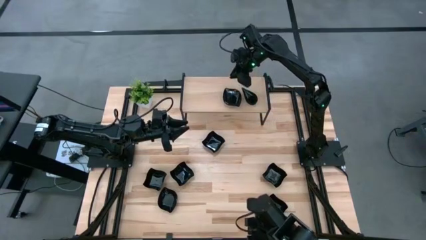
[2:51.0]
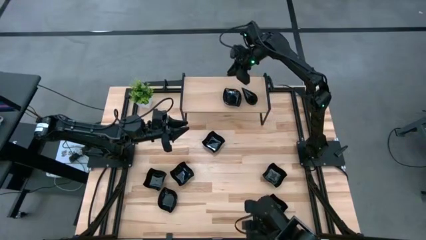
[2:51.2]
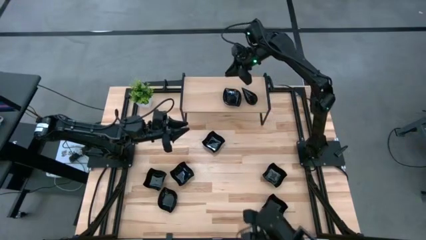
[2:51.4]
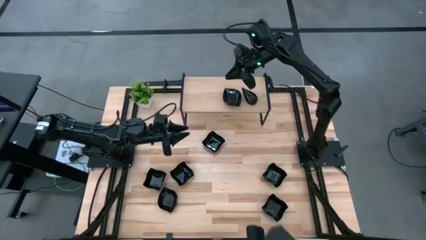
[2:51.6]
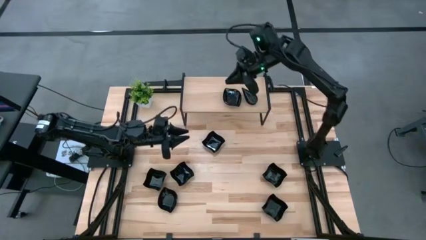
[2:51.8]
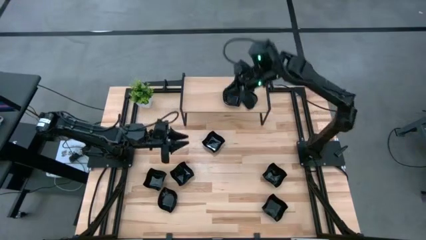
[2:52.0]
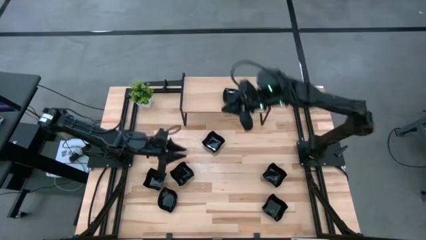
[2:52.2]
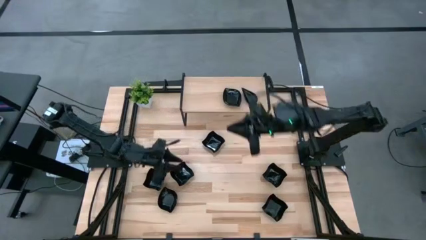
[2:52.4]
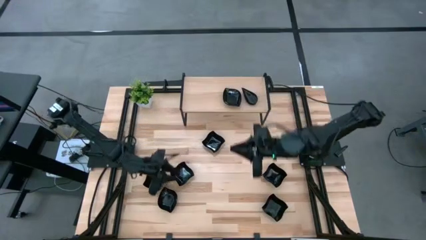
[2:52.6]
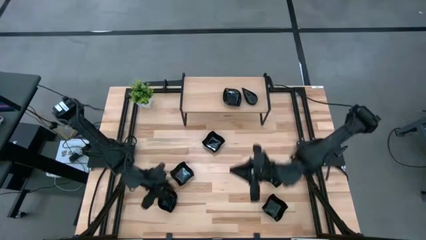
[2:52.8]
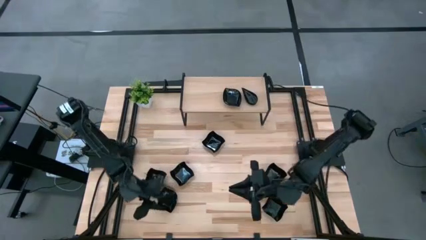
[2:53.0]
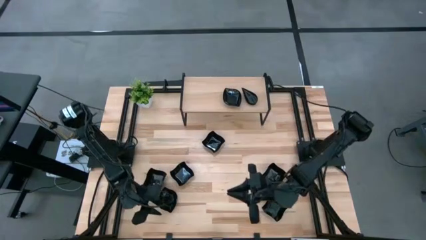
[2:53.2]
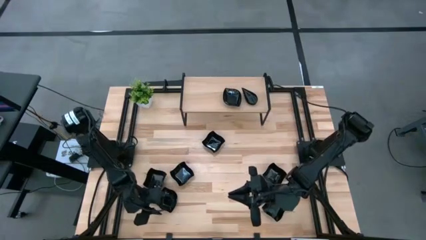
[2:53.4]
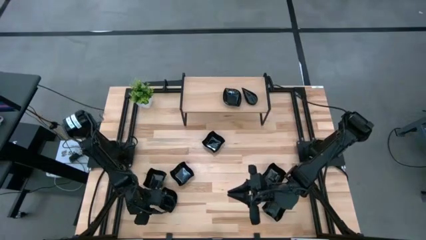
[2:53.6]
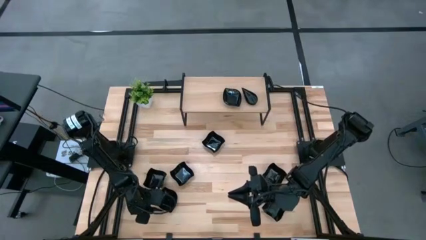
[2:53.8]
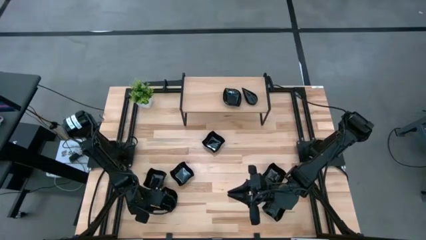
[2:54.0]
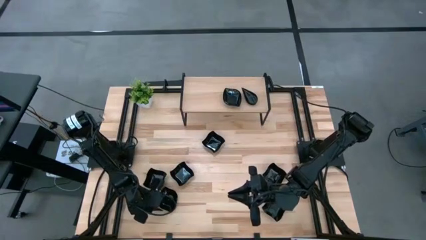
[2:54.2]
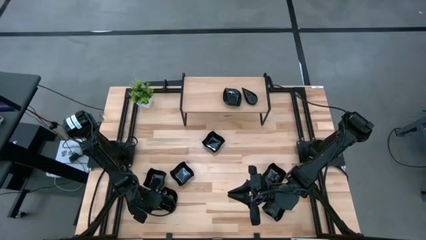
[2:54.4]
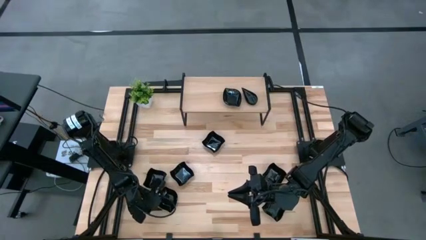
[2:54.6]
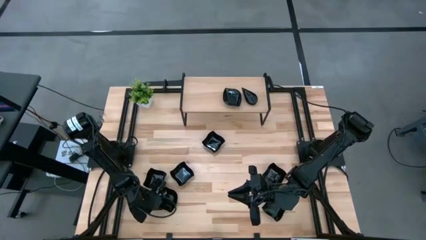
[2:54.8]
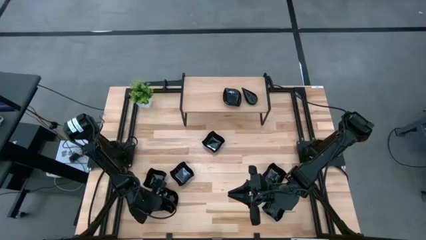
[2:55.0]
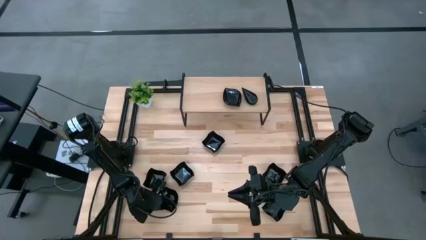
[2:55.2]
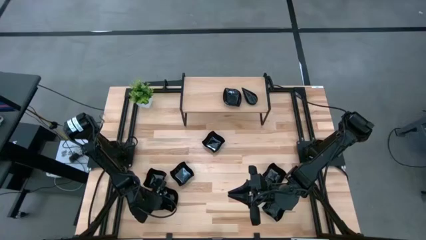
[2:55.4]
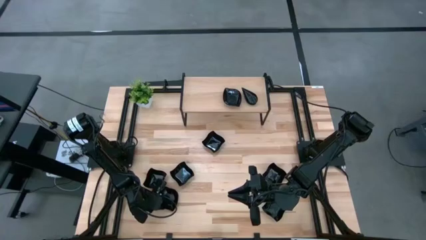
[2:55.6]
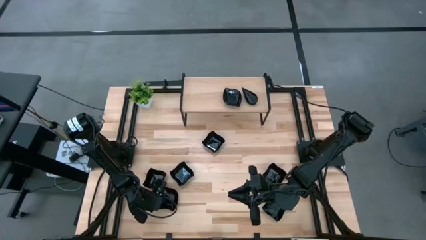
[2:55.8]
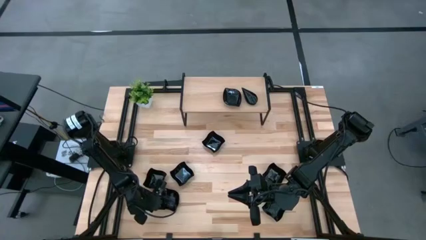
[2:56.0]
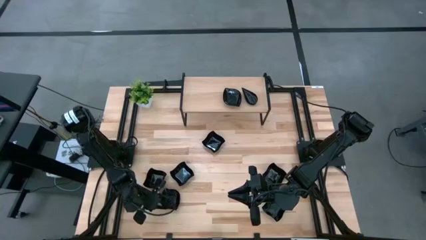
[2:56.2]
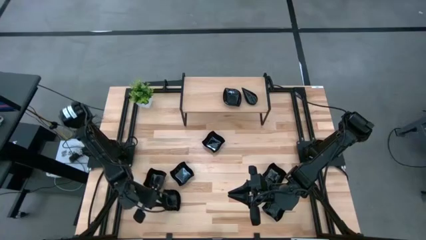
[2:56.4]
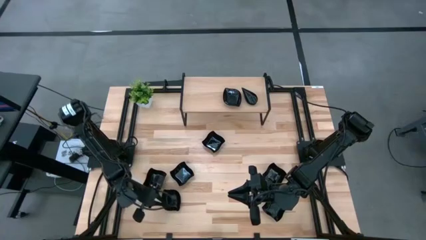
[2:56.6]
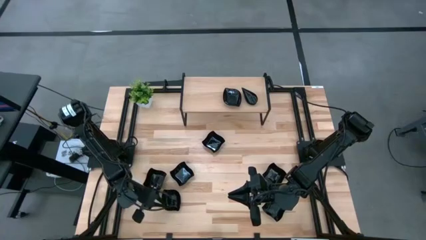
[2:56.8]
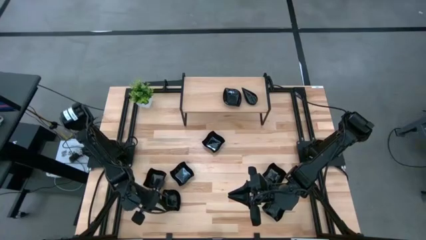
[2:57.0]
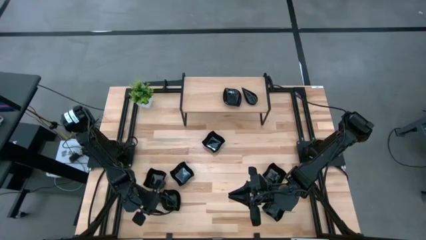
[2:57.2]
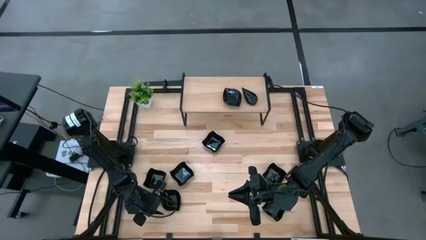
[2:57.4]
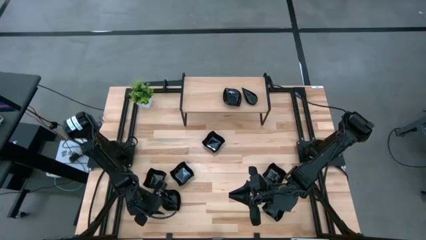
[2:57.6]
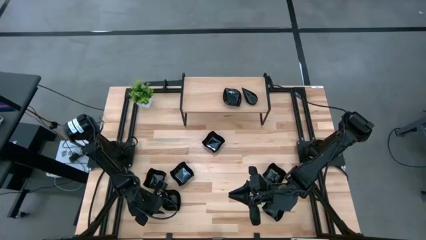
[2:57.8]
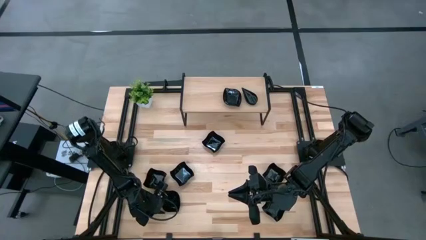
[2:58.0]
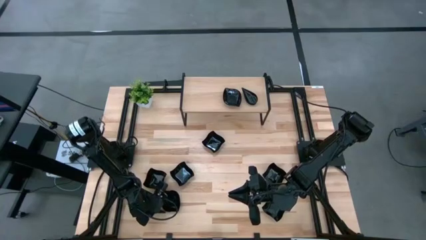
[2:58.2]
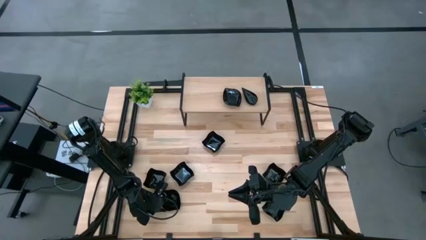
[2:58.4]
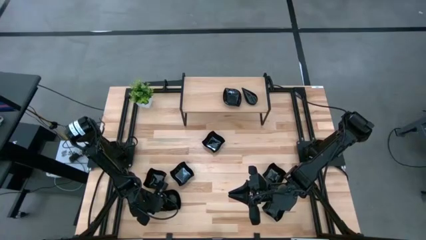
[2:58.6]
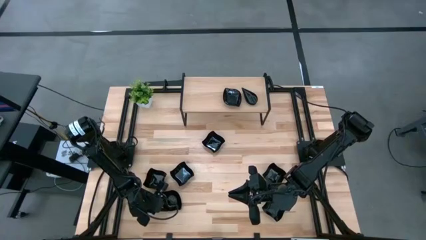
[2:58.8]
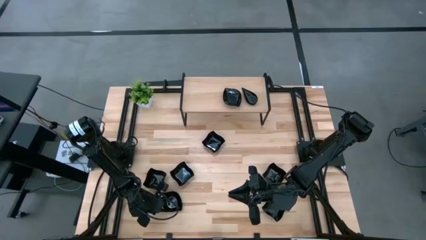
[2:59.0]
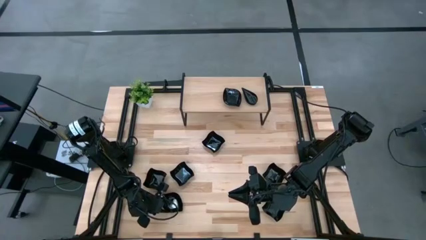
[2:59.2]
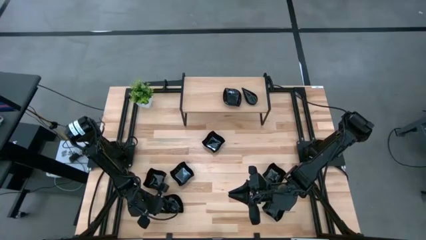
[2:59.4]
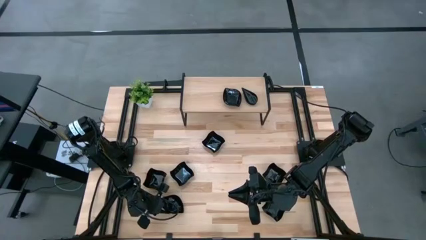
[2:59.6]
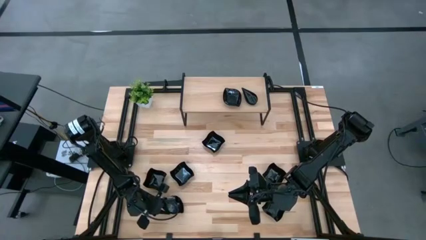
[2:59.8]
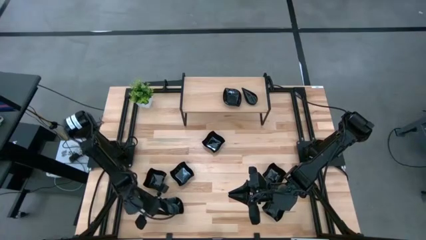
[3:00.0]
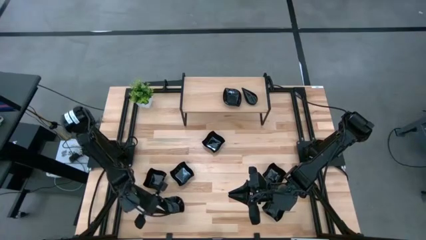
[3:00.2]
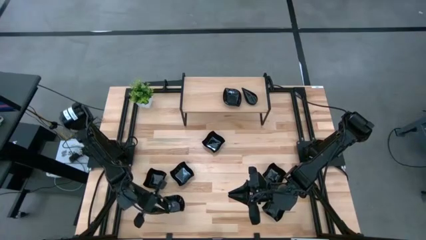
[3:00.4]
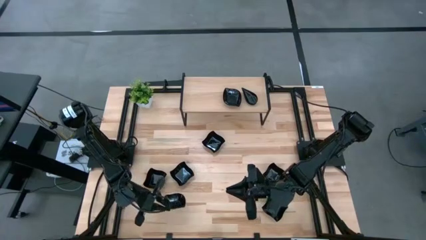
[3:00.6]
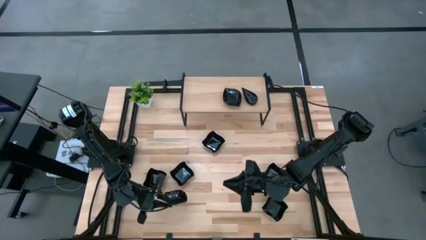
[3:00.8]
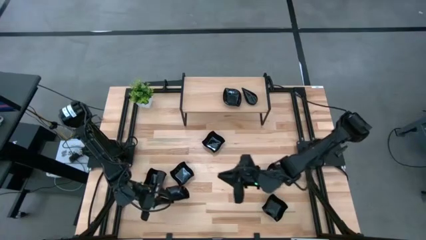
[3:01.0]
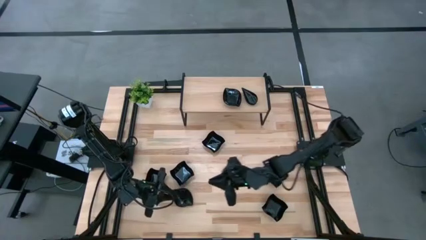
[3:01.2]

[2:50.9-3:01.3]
Task: Pick & Place Mini shaped plates
Stack the black leaf shaped plate on top of the black leaf shaped plate on the shelf

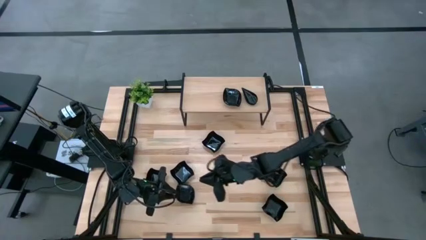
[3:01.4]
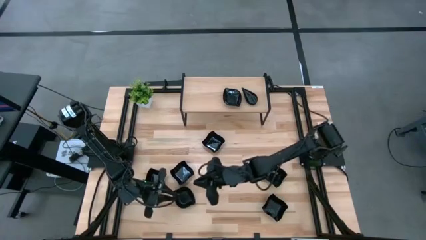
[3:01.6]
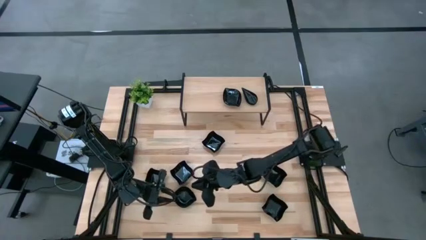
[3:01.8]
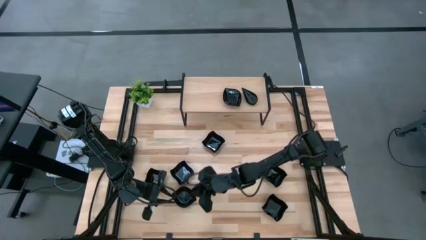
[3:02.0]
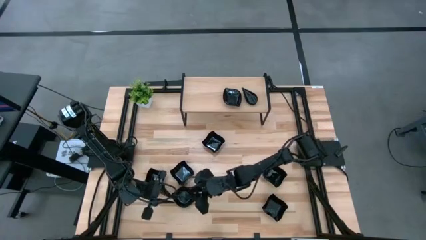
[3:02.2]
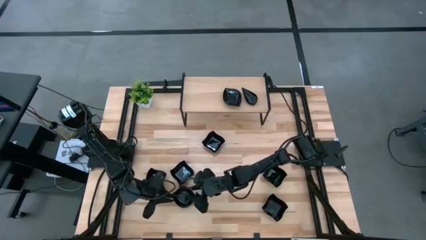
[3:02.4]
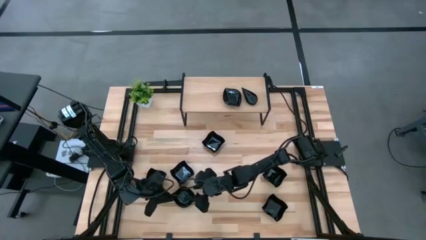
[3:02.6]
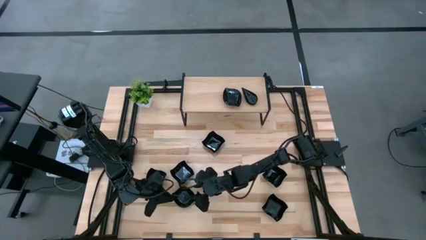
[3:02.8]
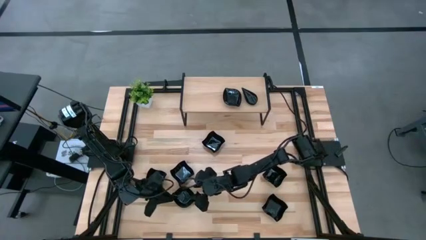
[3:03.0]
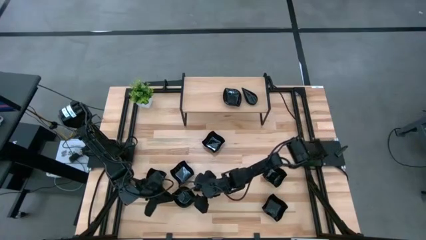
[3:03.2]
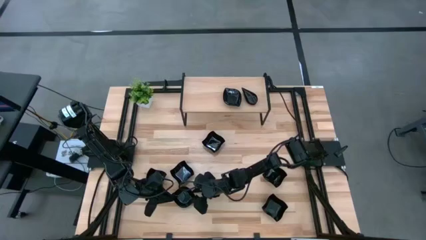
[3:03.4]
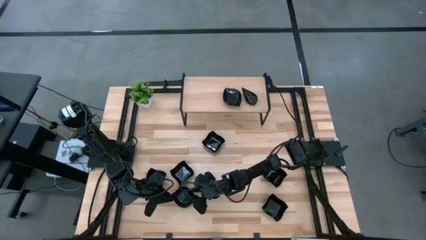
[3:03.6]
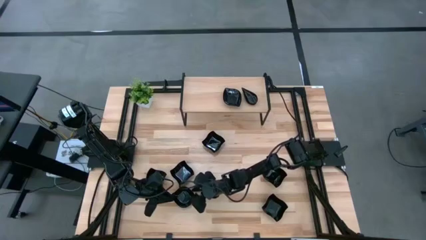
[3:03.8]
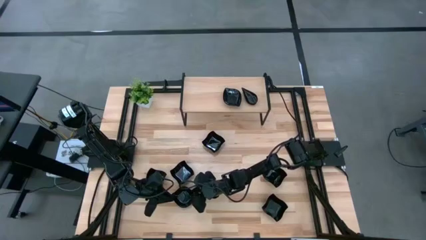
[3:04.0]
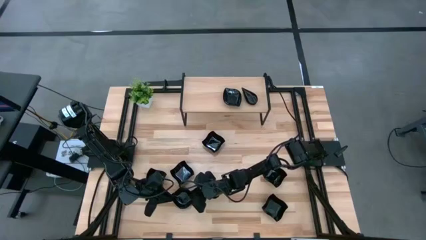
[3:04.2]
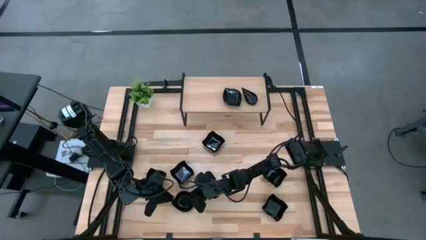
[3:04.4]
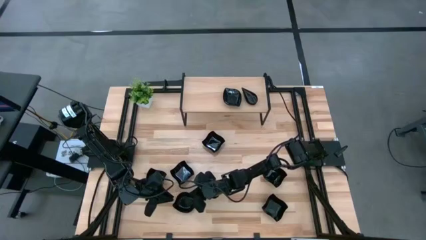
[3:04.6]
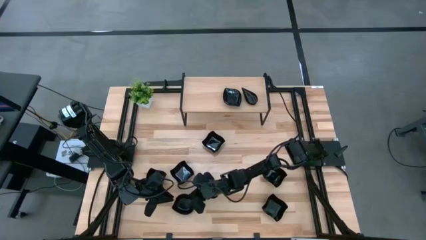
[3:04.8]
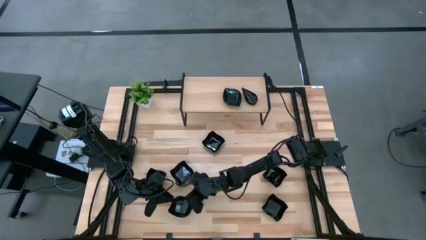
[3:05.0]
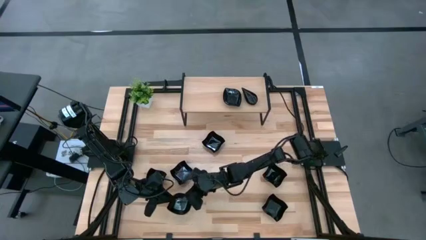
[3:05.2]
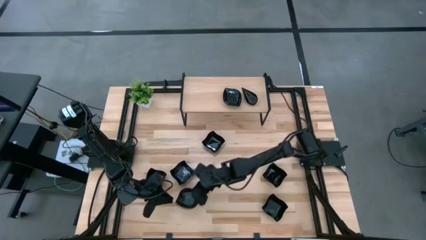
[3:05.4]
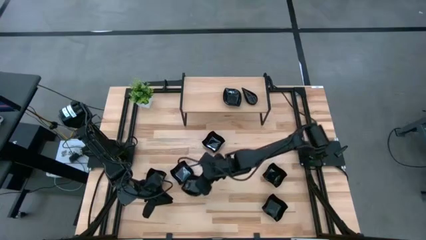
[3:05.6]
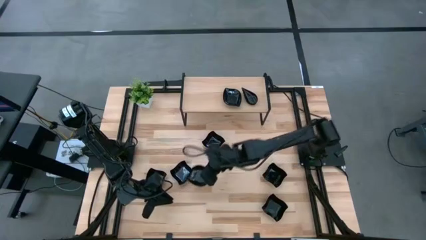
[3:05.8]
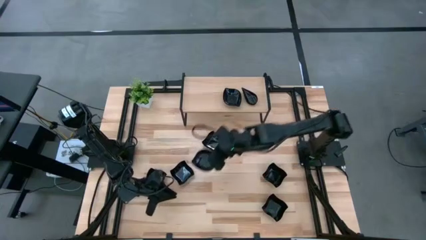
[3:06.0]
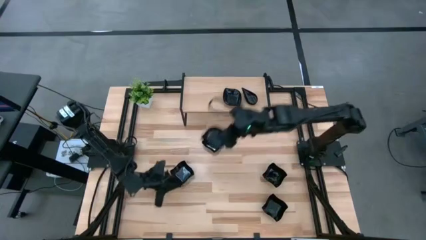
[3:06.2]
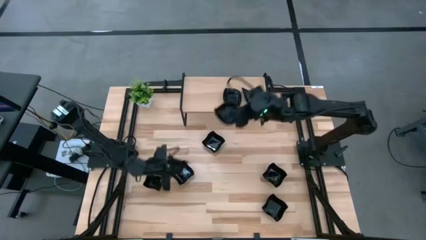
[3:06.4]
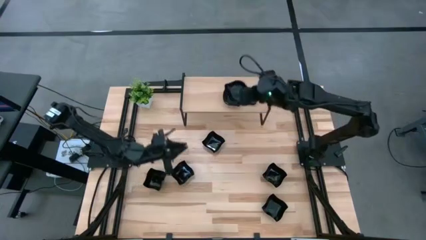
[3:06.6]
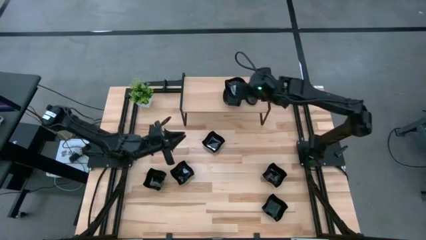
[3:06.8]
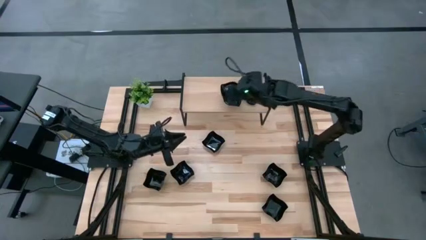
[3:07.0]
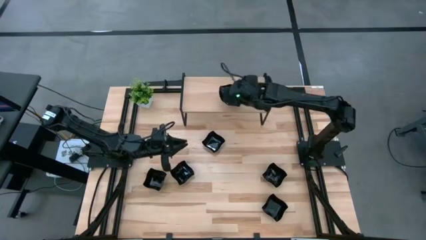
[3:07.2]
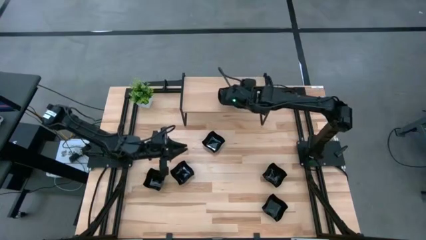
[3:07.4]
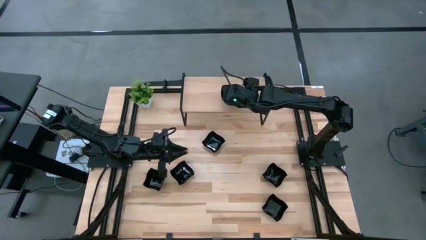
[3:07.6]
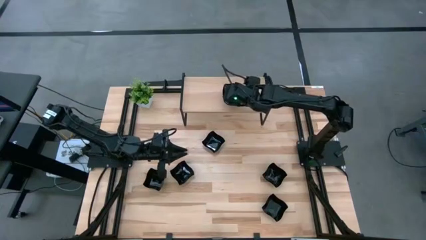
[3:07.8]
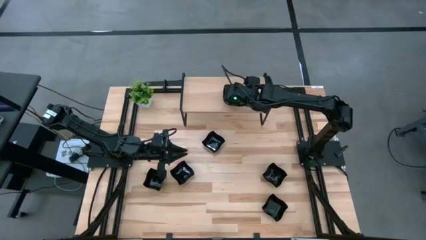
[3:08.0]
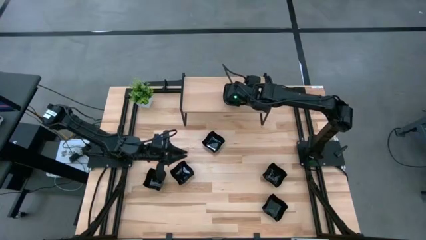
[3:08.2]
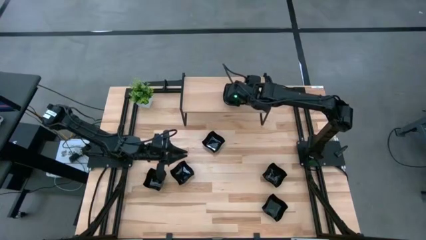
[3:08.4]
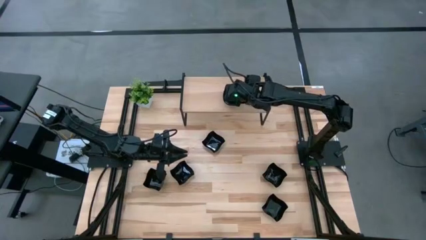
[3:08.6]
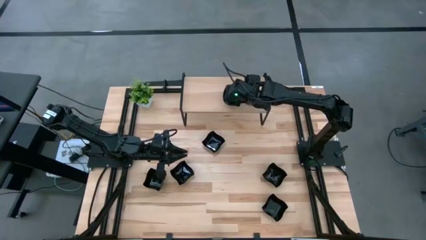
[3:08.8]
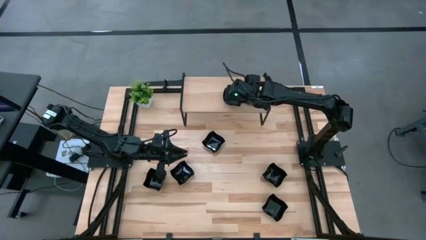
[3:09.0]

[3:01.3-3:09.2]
Stack the black leaf shaped plate on top of the black leaf shaped plate on the shelf
